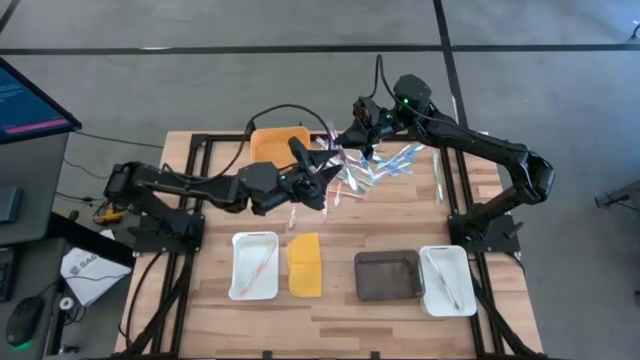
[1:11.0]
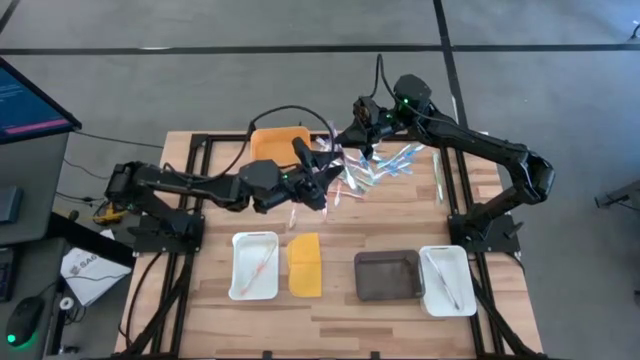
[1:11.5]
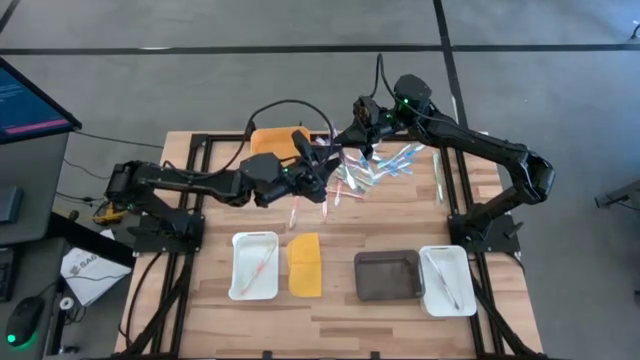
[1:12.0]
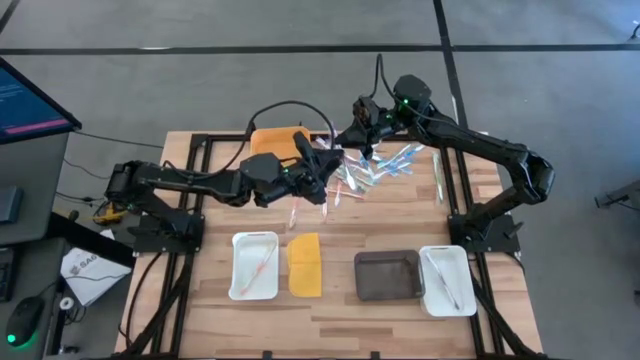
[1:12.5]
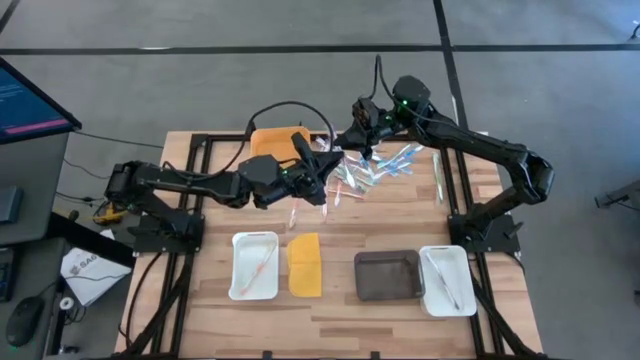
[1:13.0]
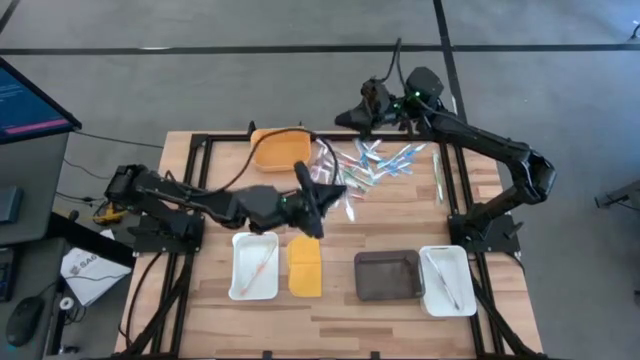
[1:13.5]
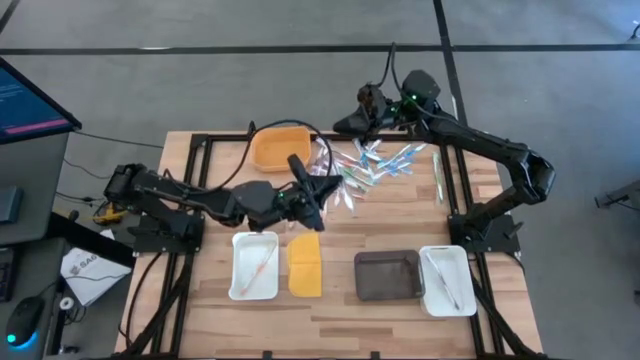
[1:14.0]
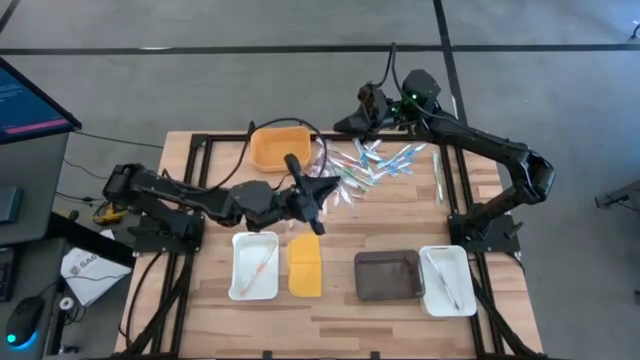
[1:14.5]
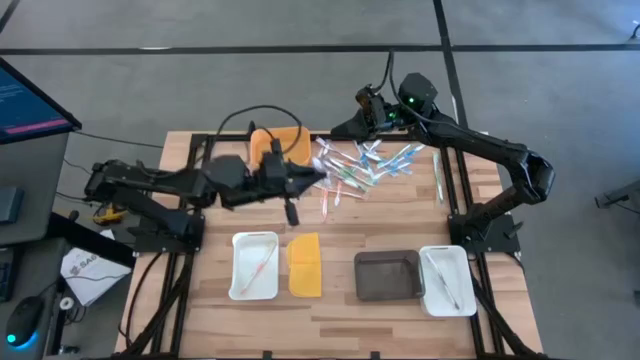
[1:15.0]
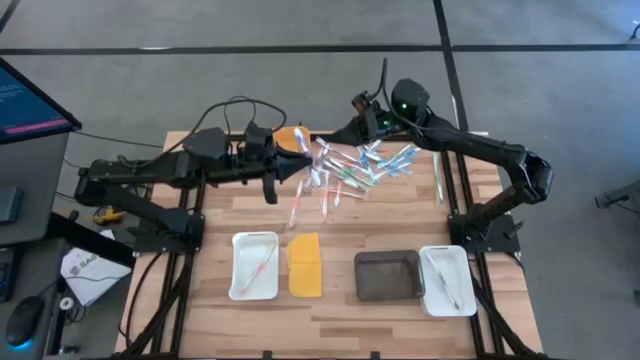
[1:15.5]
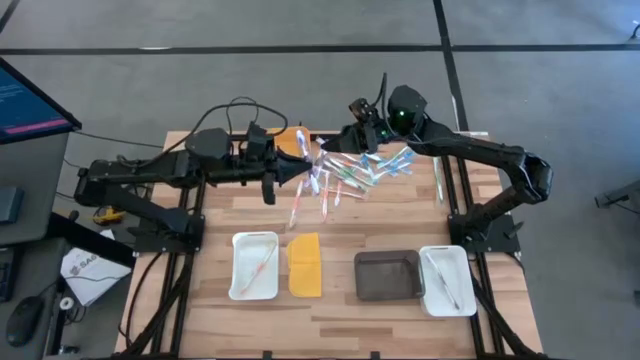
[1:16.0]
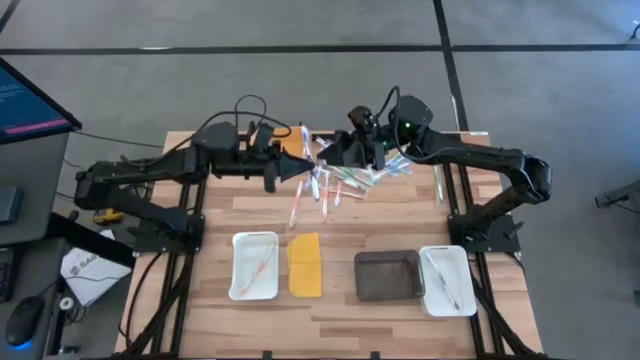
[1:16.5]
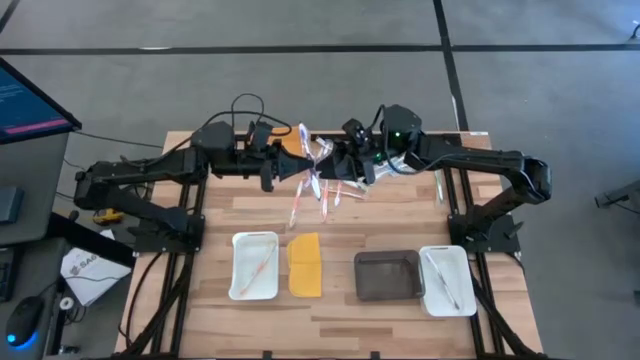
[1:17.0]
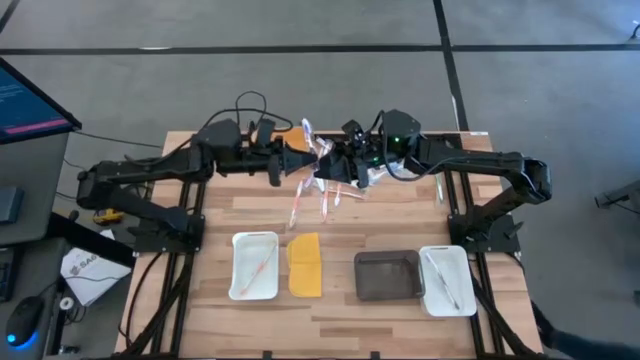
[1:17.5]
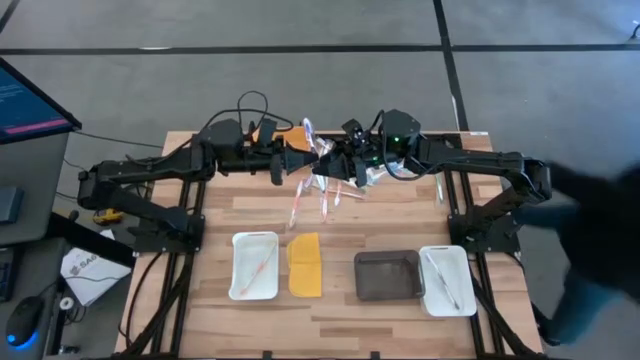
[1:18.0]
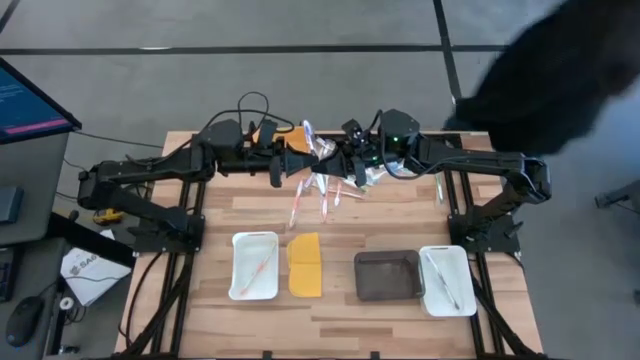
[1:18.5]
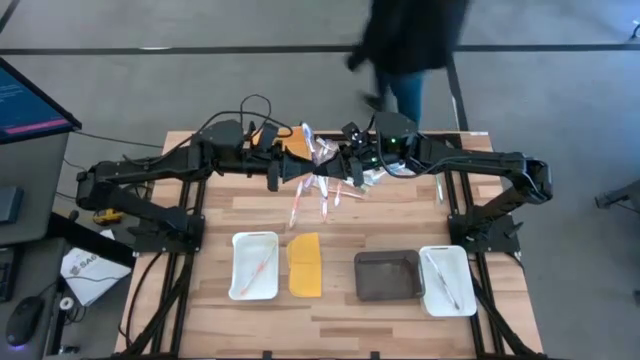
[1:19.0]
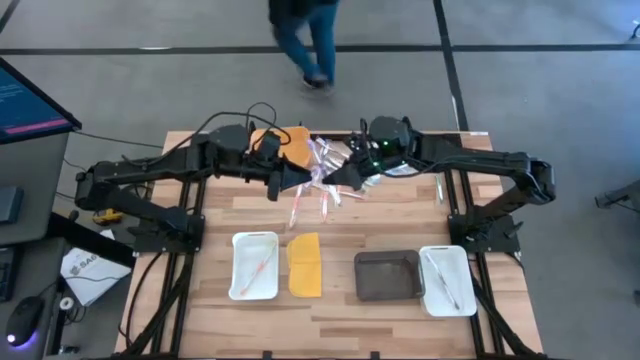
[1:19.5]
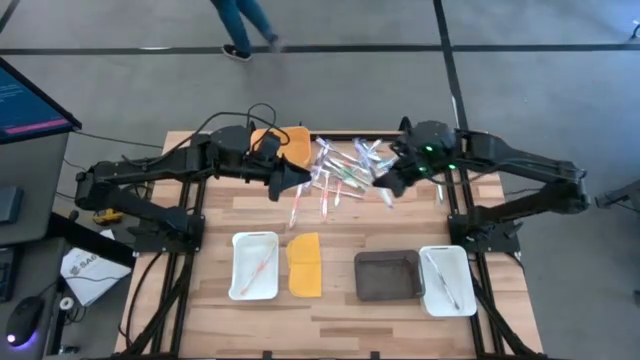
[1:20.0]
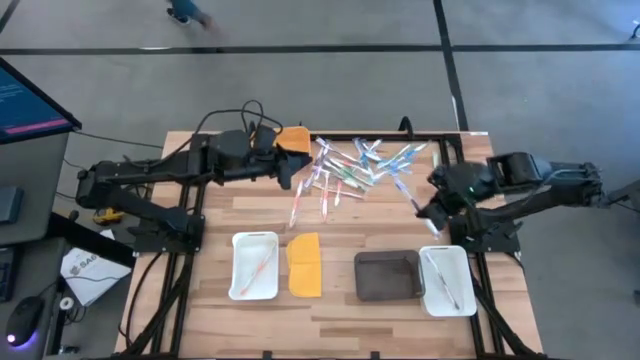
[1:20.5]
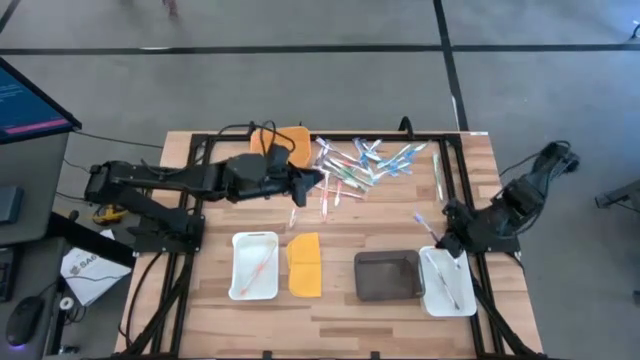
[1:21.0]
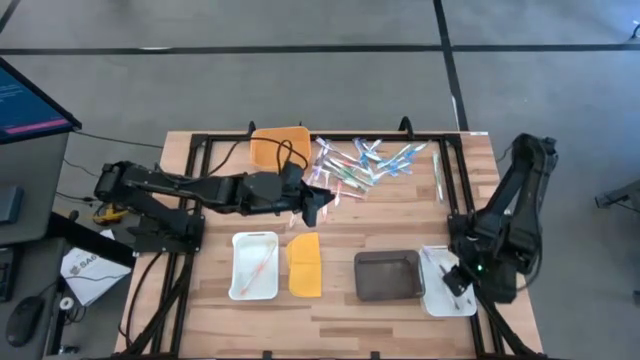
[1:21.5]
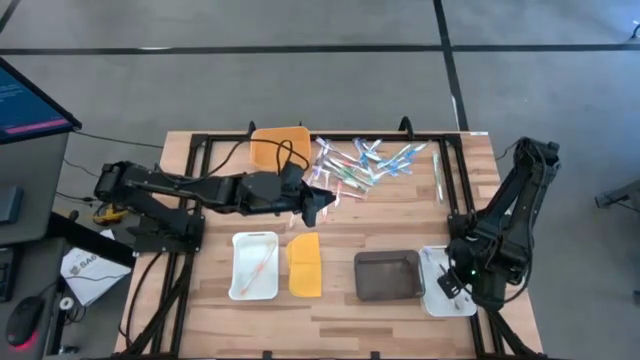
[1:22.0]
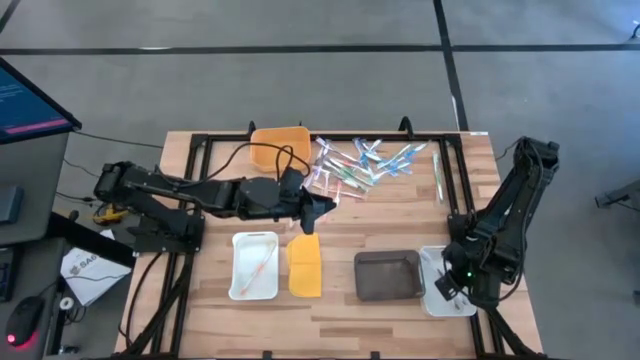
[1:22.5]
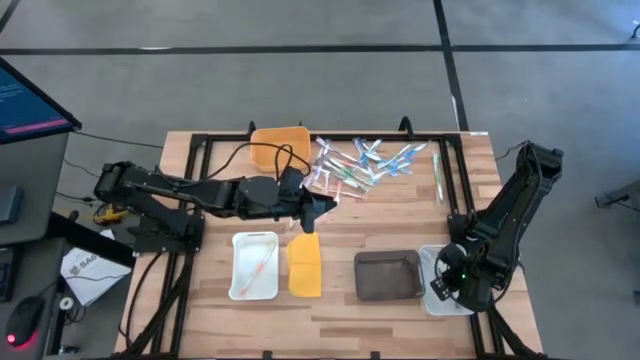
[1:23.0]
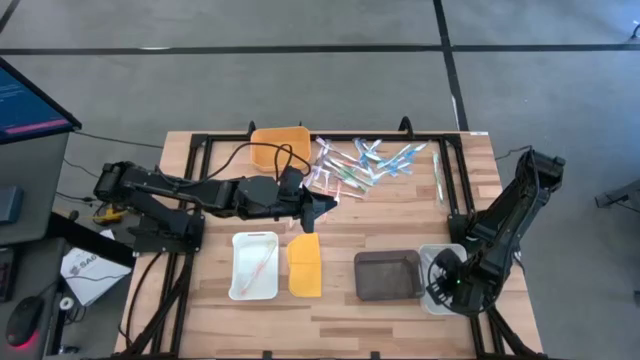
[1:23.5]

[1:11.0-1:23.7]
Task: Pick & Place Toothbrushes
Put the purple toothbrush into the right white bin

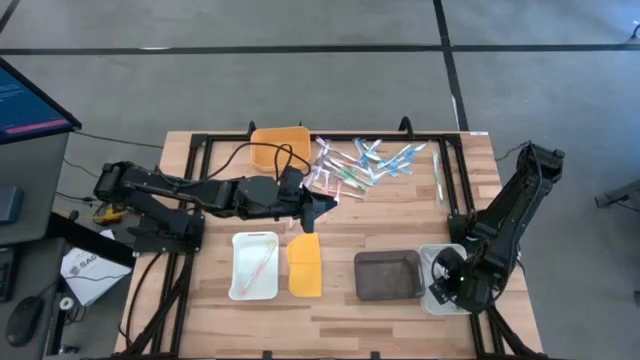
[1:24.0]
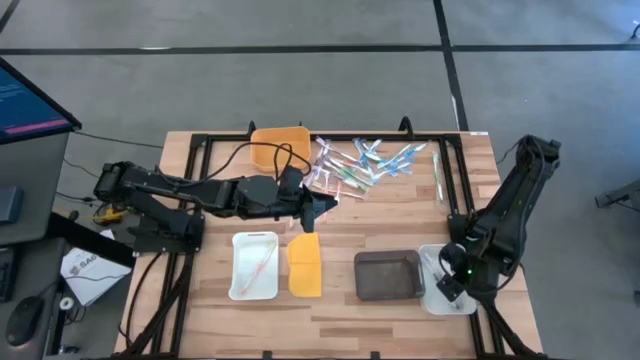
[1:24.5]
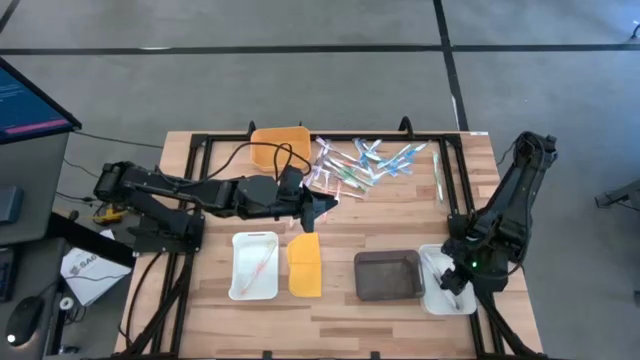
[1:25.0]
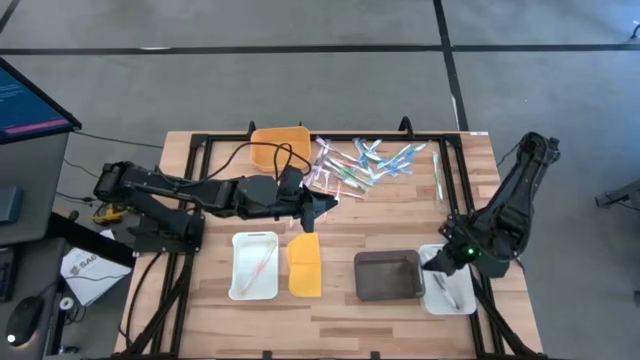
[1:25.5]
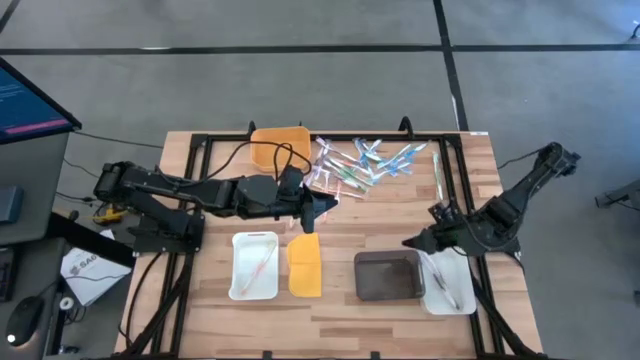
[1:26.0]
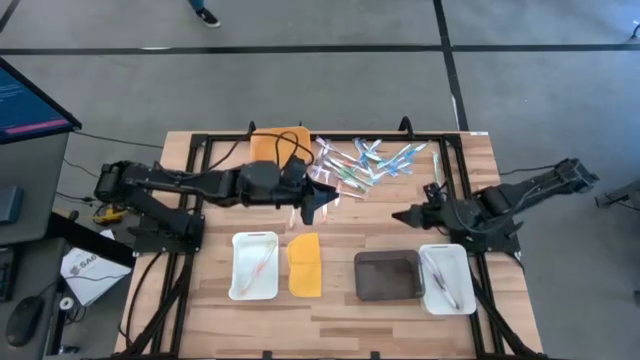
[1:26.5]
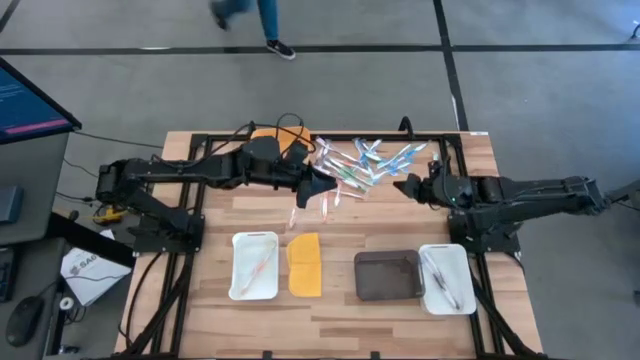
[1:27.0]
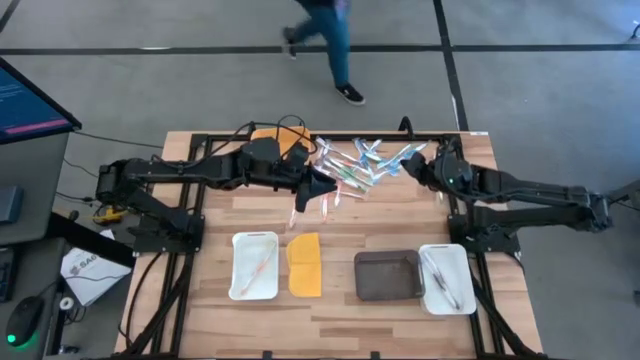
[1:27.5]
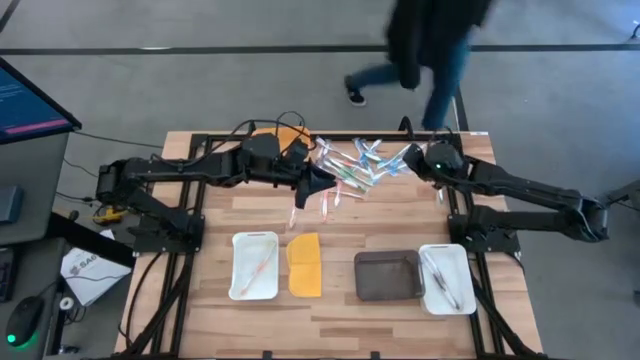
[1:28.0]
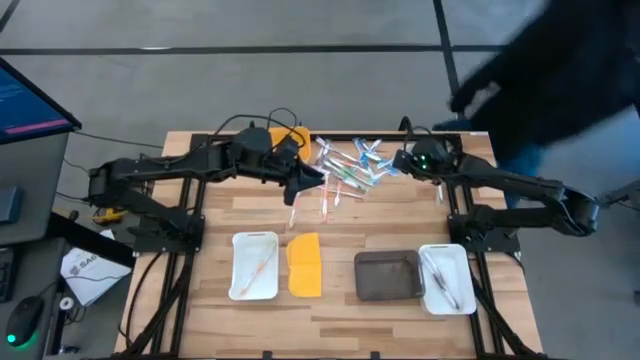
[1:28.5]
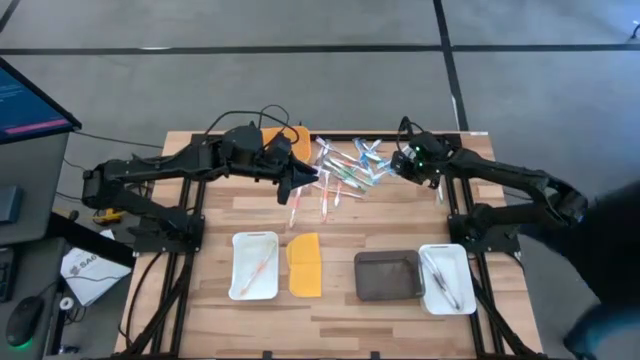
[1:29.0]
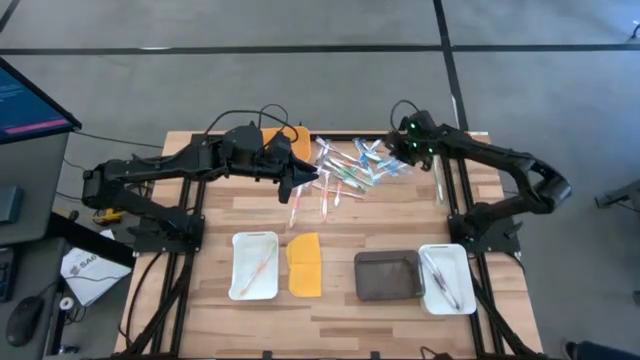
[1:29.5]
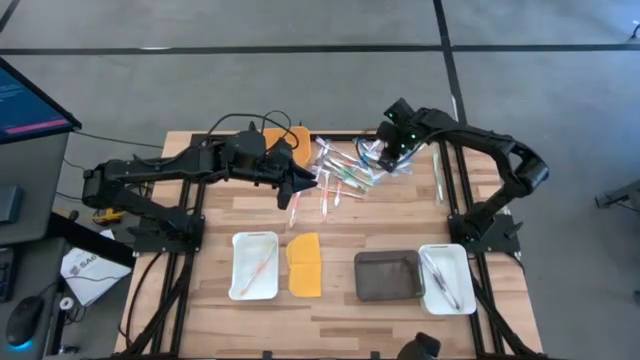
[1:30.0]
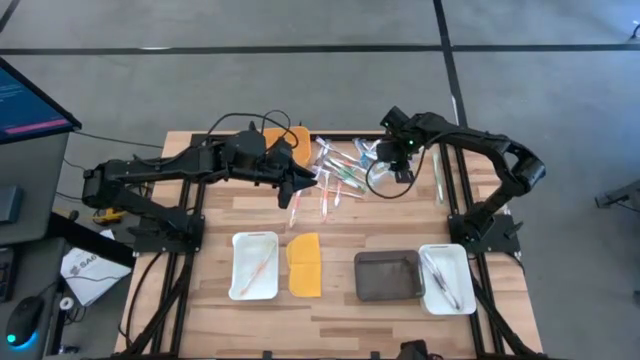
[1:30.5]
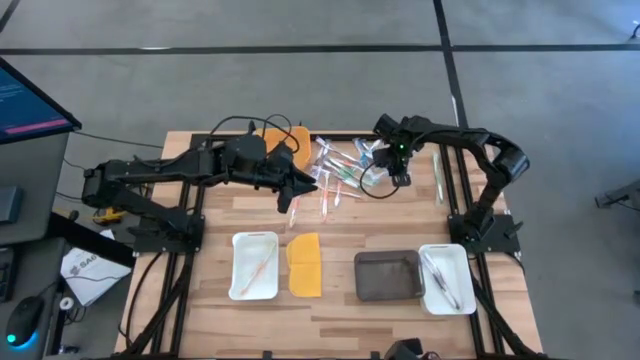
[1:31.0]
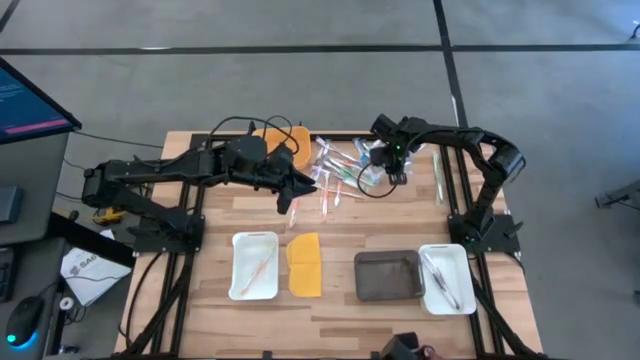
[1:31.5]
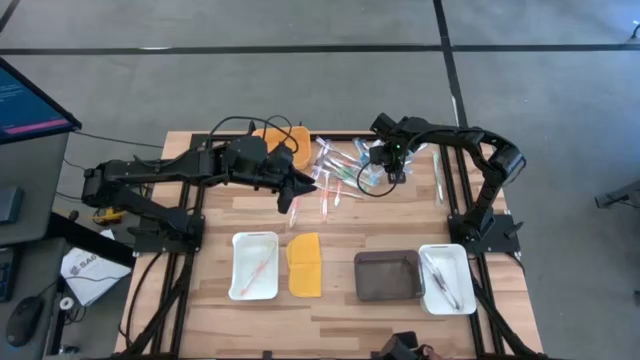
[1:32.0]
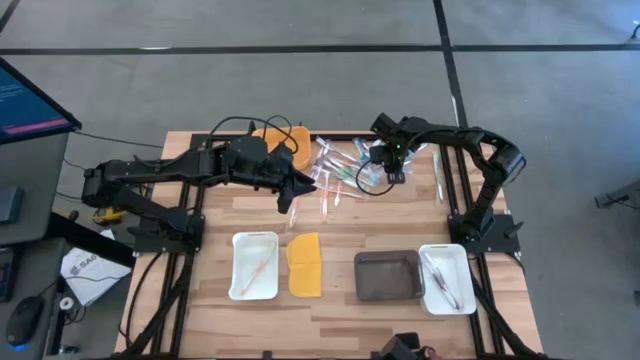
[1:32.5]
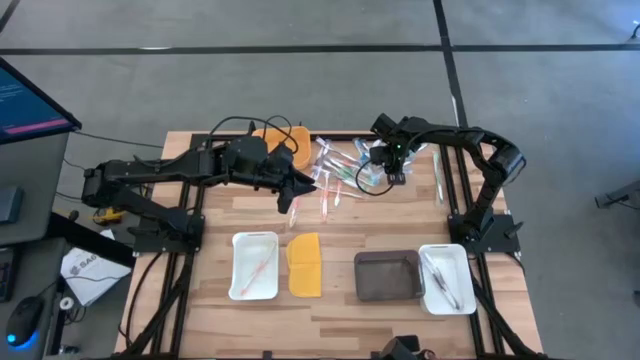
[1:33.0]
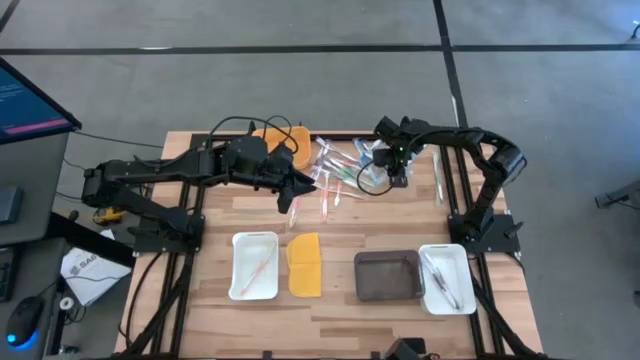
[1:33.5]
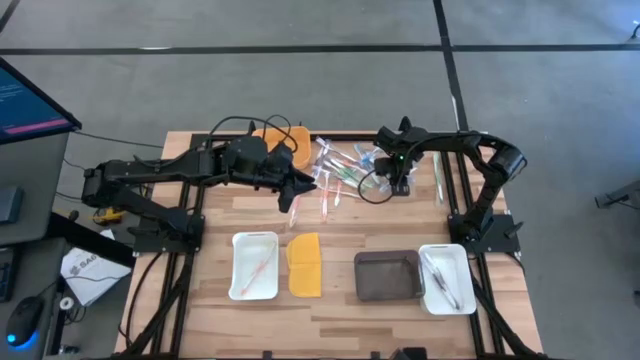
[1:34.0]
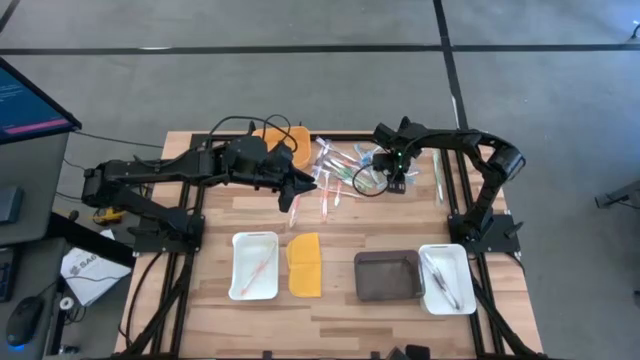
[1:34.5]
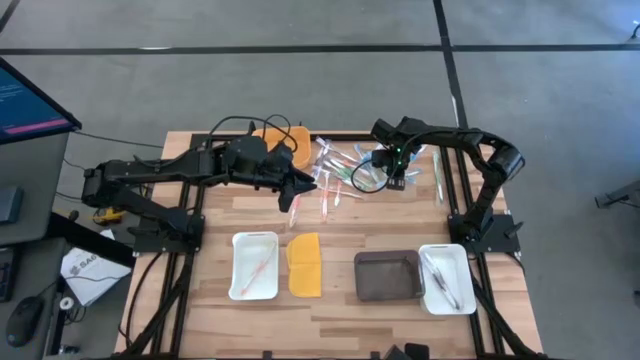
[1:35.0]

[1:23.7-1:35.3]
Put the blue toothbrush into the black bin
